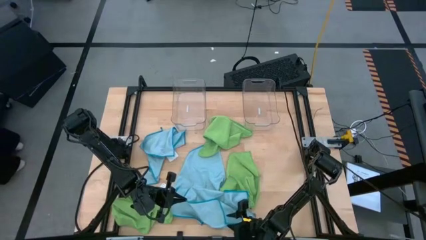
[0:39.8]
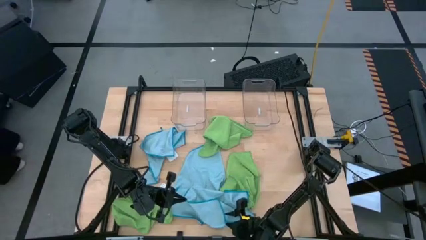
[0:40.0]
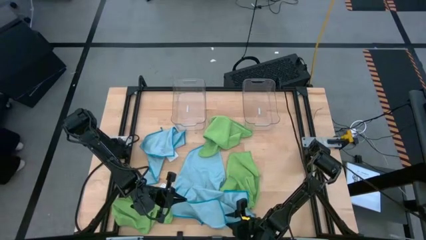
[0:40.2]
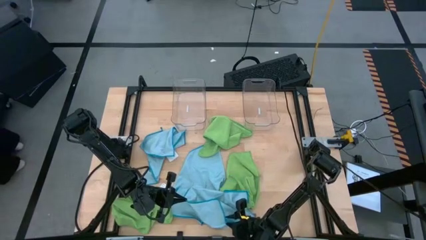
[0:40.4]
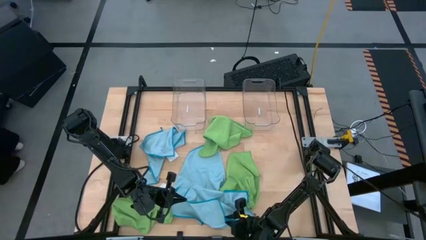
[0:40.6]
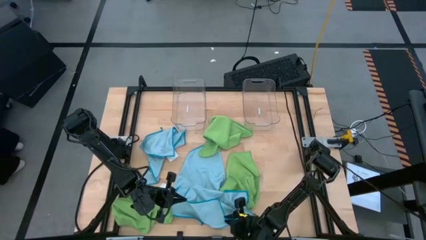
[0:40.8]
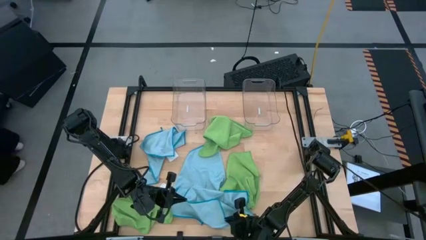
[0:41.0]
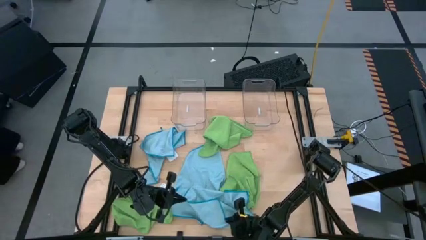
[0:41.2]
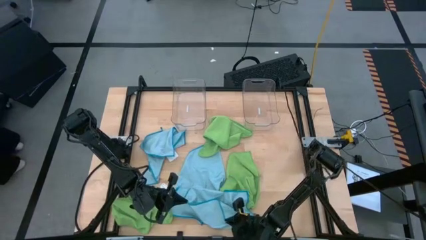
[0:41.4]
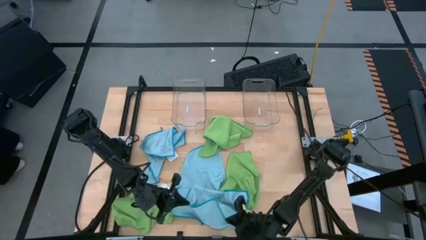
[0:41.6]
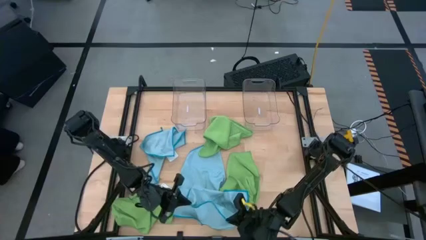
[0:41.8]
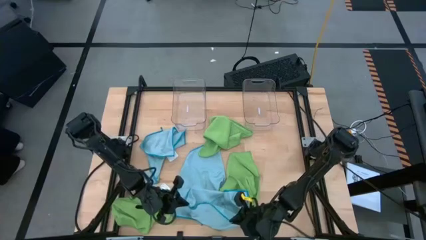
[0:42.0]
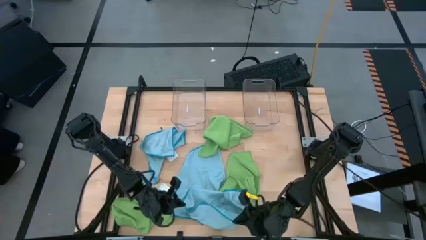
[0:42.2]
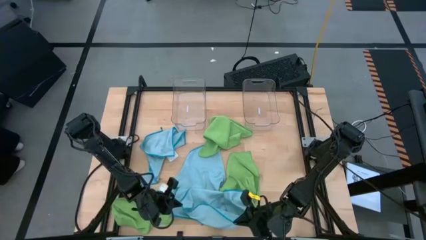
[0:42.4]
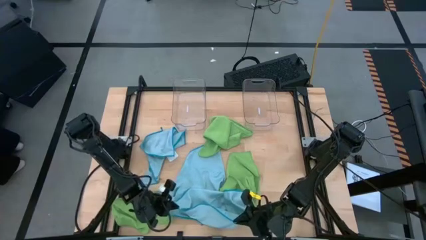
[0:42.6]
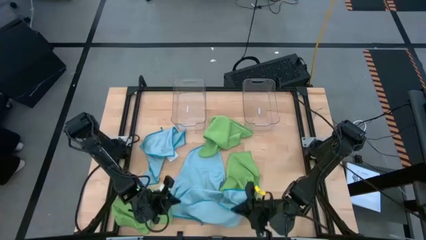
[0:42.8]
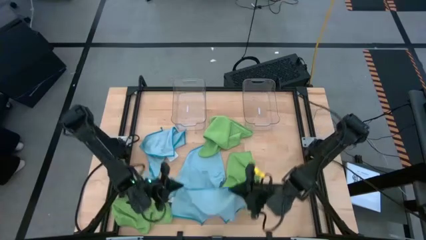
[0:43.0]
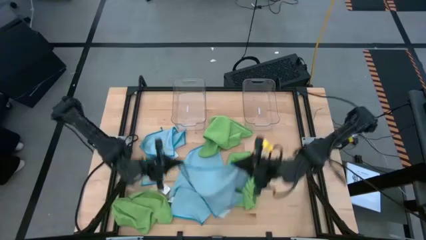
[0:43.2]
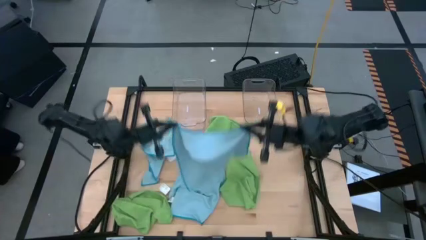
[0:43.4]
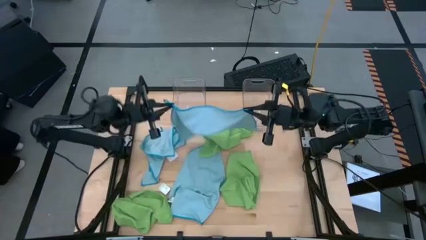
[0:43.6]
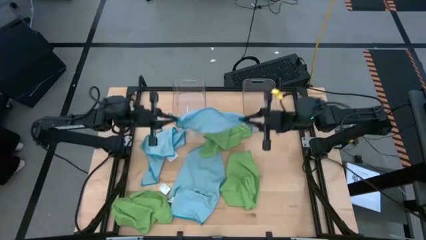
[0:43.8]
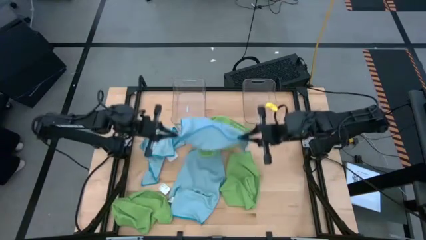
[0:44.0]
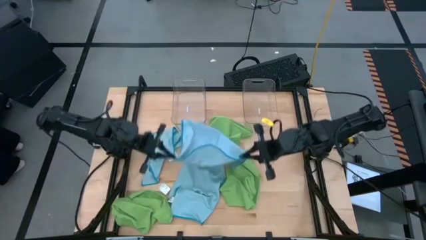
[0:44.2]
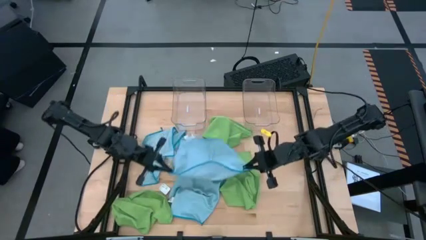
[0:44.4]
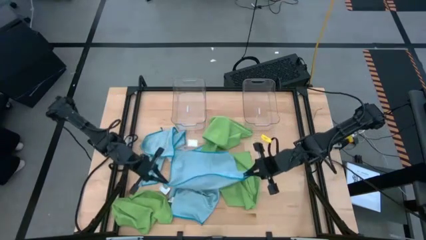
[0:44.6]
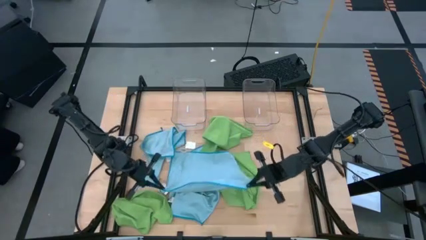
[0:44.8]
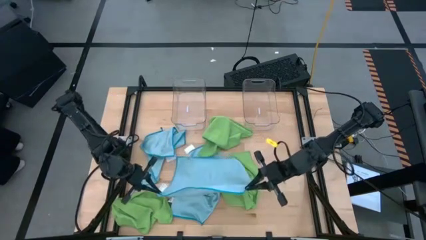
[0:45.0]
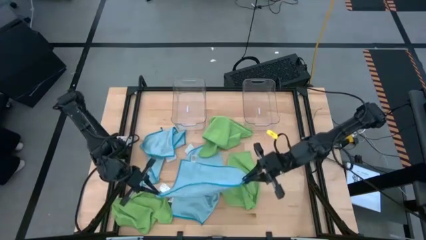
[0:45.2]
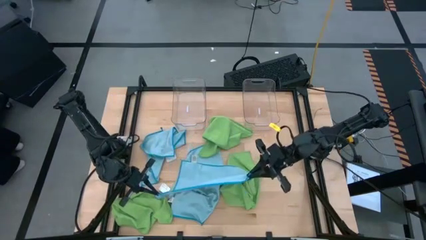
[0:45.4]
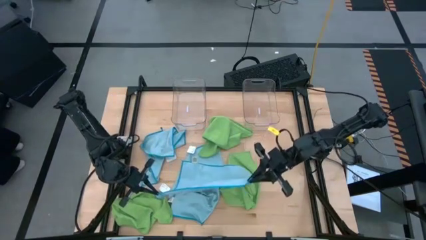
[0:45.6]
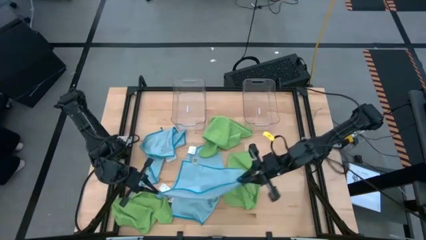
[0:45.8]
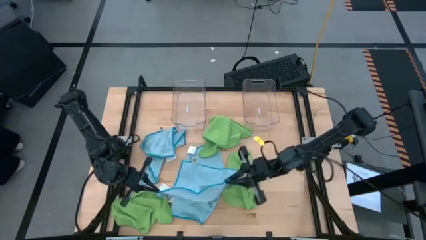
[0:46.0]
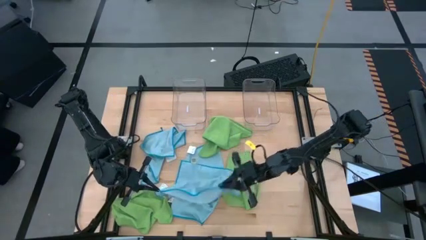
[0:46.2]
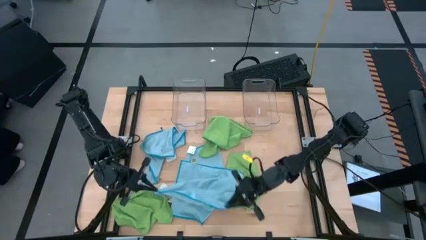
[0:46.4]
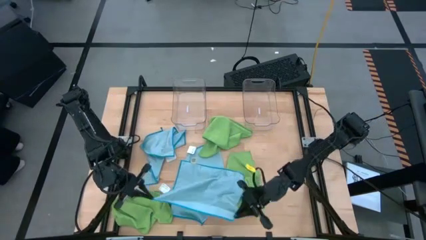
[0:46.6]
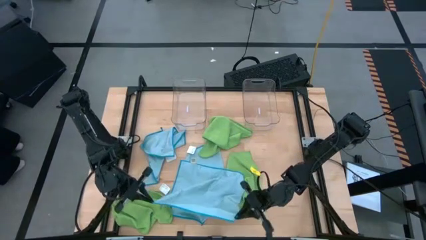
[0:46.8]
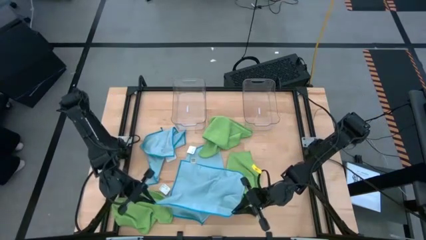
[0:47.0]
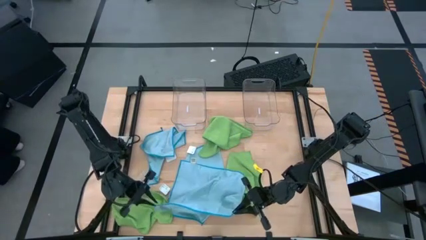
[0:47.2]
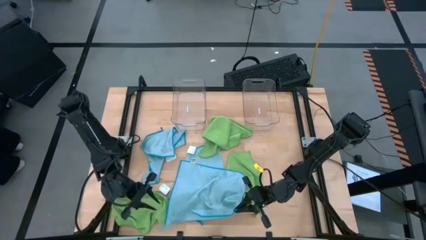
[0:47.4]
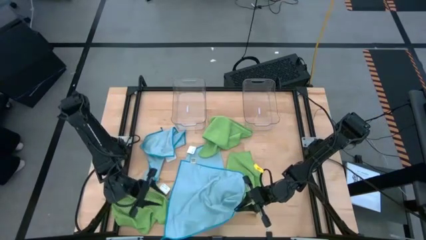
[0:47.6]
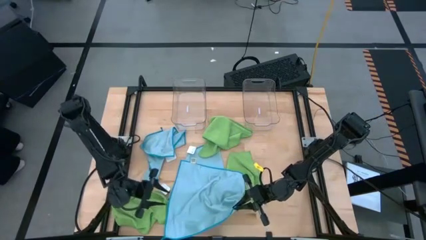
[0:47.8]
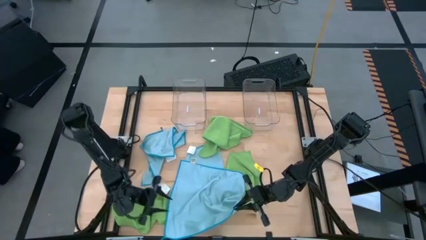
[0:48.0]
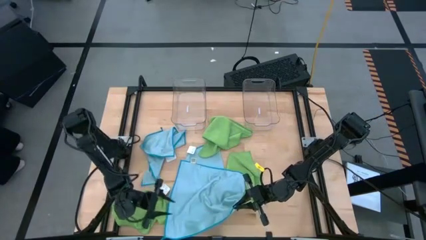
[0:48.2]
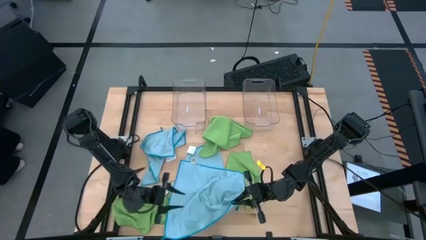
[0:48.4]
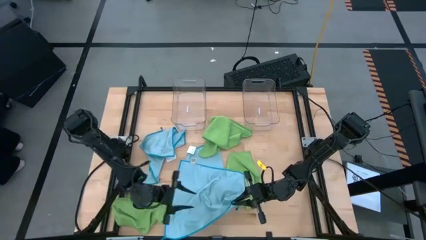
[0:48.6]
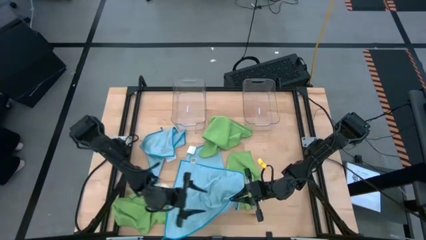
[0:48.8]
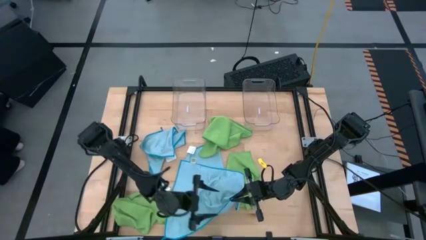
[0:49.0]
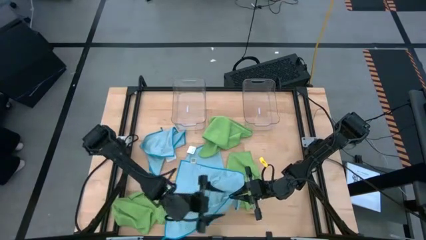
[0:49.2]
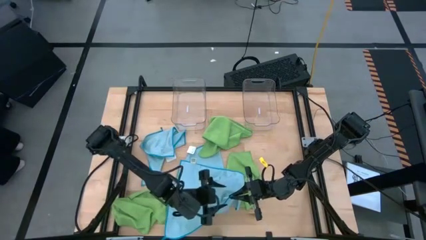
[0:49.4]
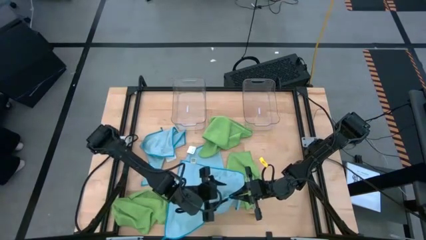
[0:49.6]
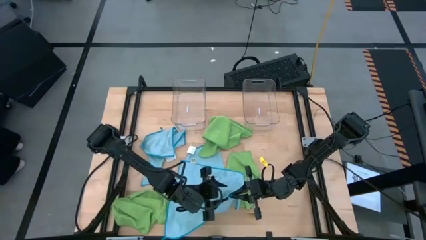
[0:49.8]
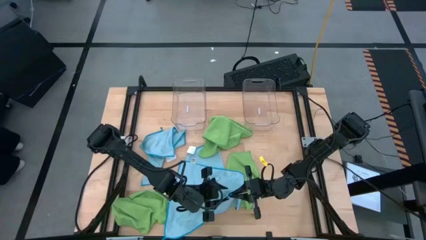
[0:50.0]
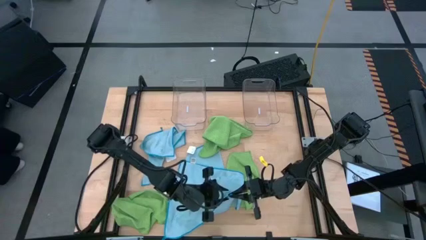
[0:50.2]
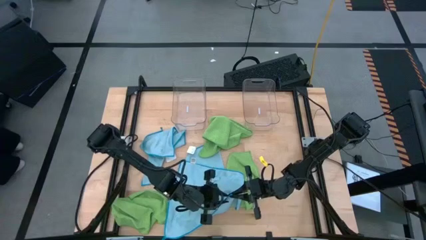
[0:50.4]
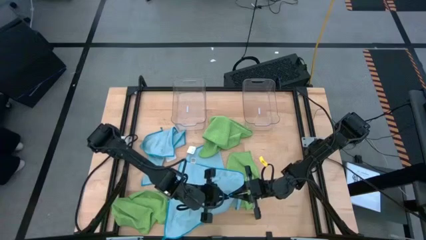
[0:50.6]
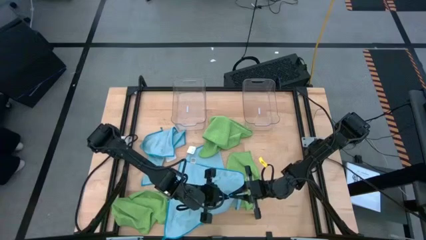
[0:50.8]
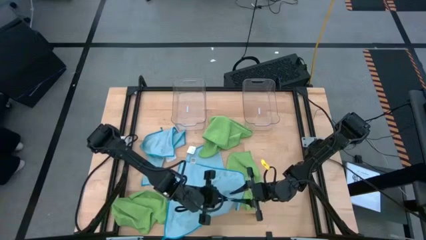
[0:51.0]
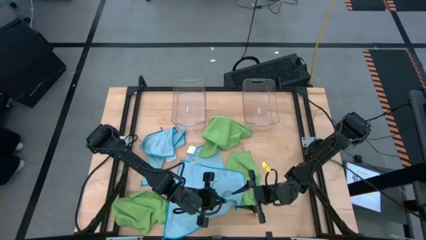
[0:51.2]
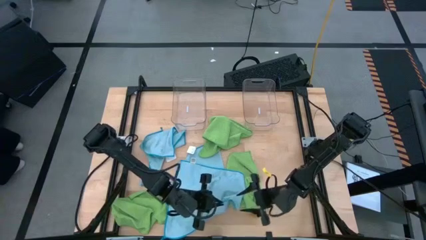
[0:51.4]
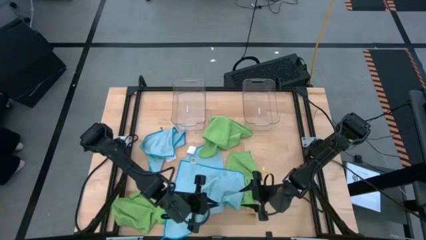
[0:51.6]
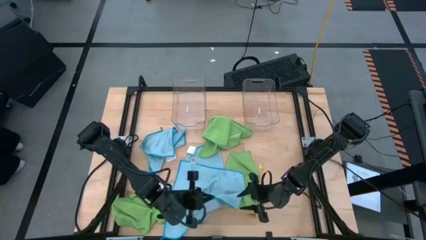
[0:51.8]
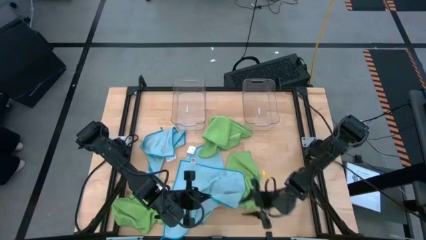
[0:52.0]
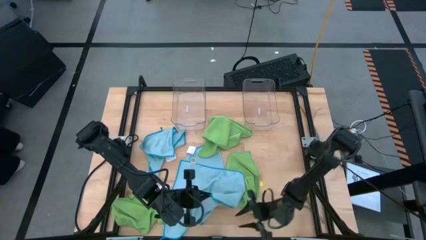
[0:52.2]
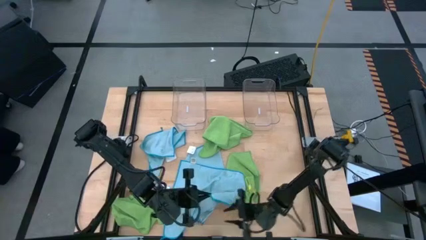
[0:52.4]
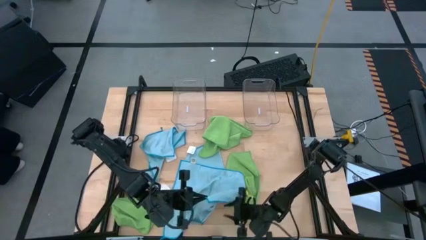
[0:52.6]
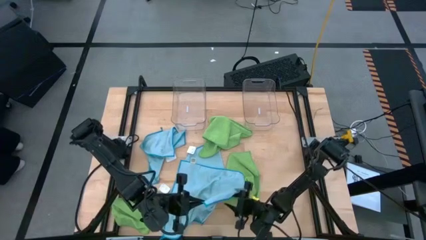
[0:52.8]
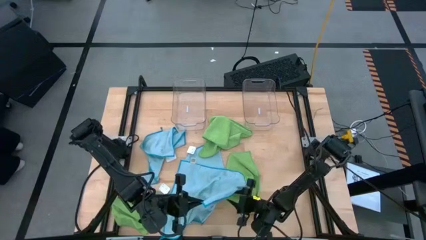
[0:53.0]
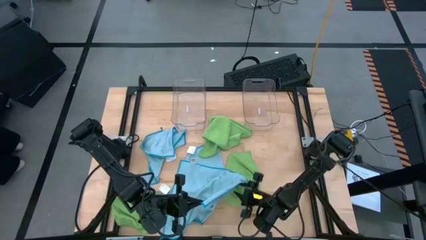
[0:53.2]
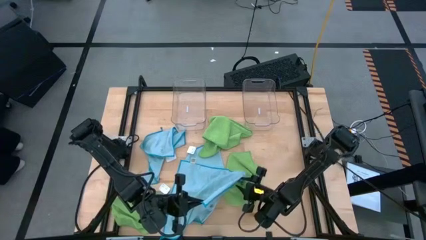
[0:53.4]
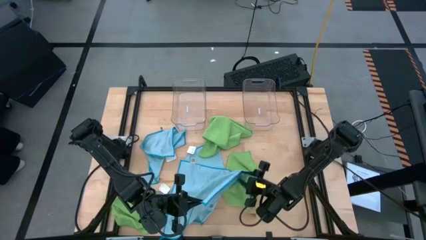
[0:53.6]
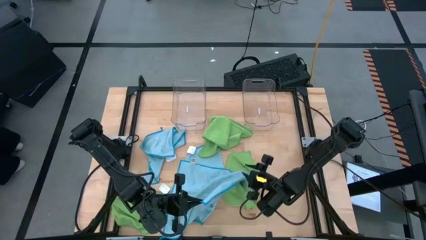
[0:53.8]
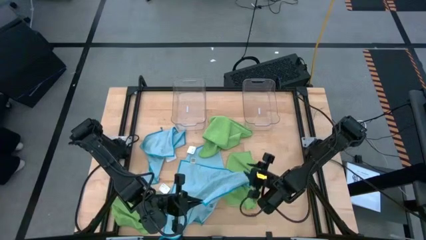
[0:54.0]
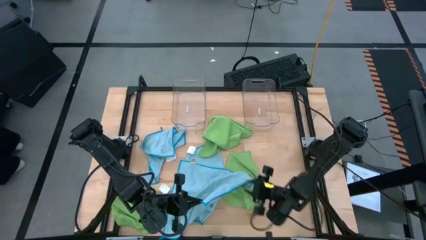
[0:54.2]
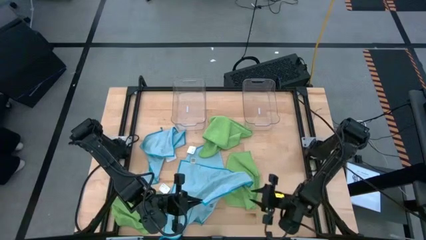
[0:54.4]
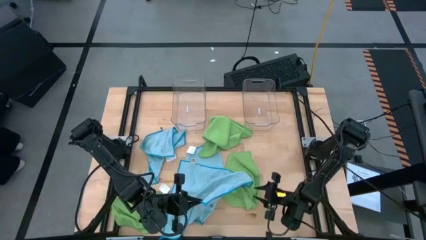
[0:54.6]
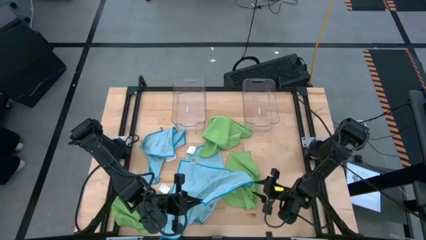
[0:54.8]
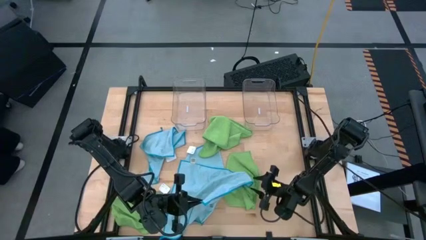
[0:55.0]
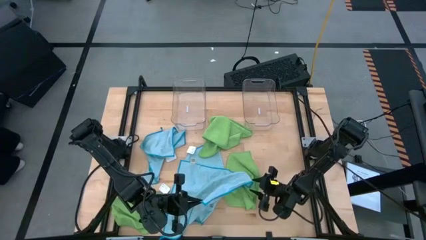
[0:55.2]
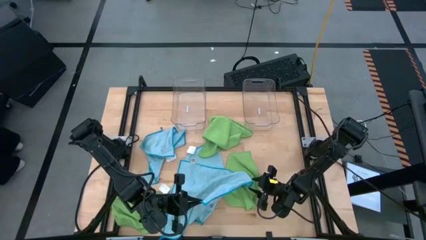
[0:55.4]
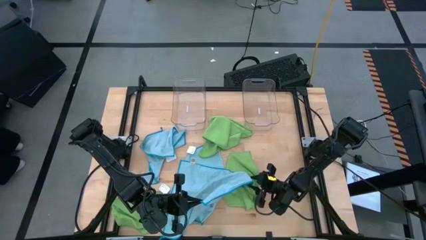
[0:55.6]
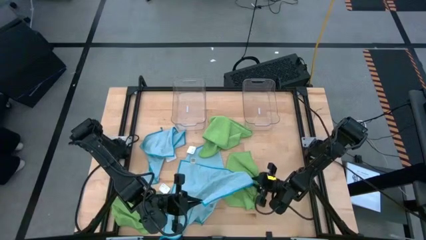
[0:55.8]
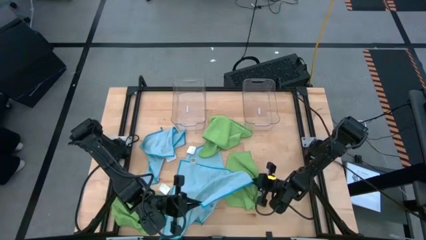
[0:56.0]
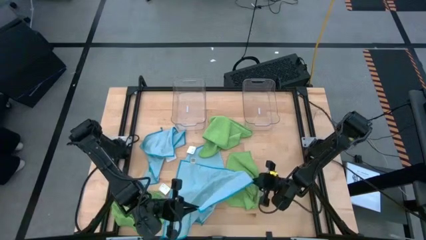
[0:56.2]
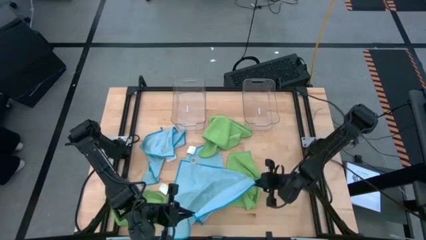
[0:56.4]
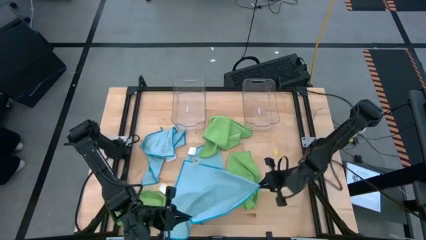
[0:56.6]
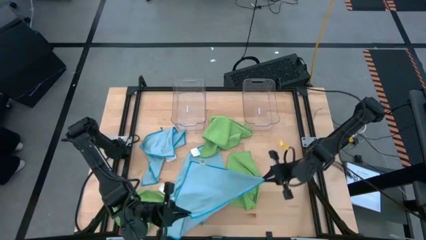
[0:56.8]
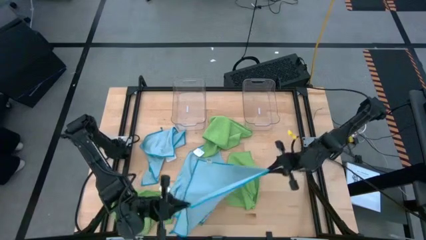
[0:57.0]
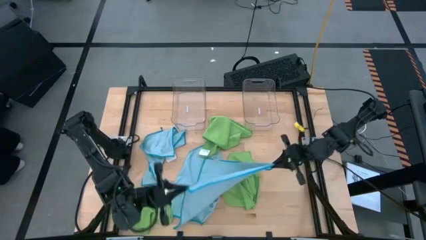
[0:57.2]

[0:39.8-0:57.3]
Task: Fold microfiber towels
Fold the right blue microfiber towel
